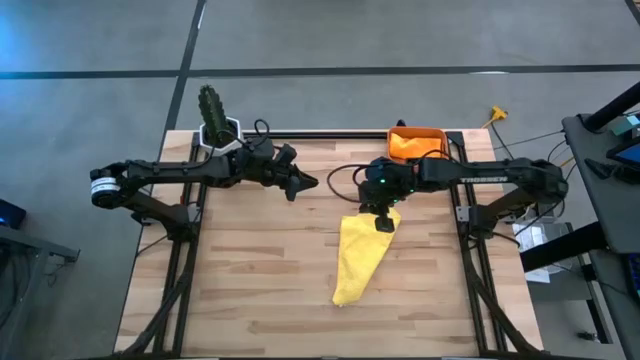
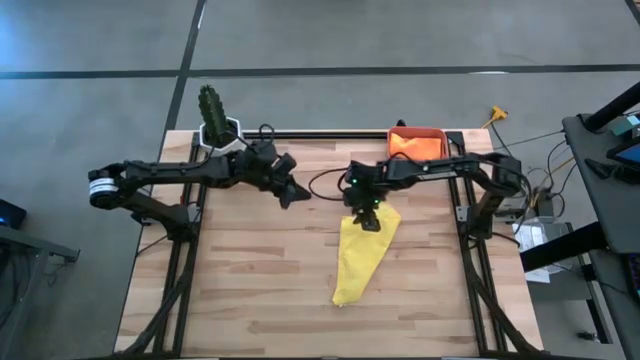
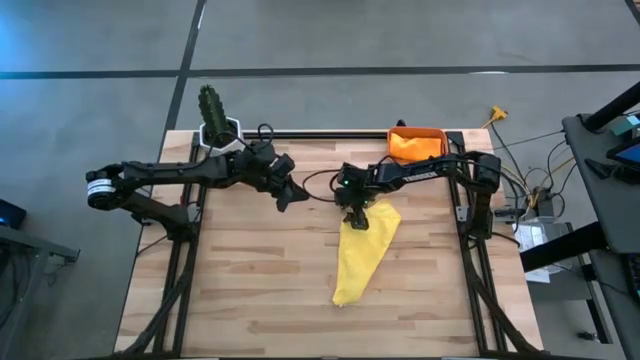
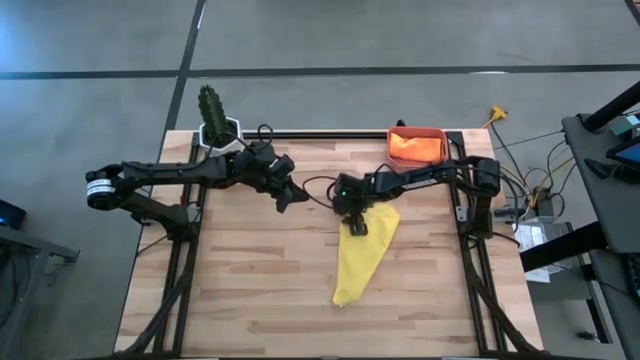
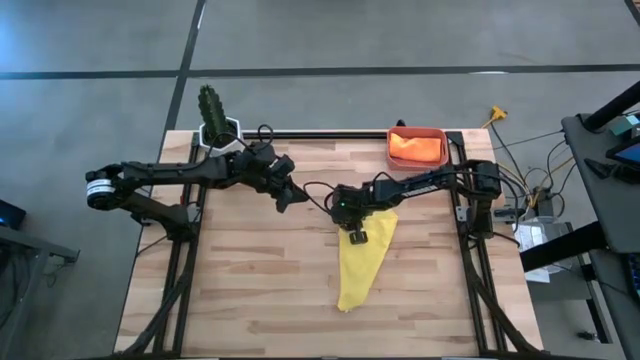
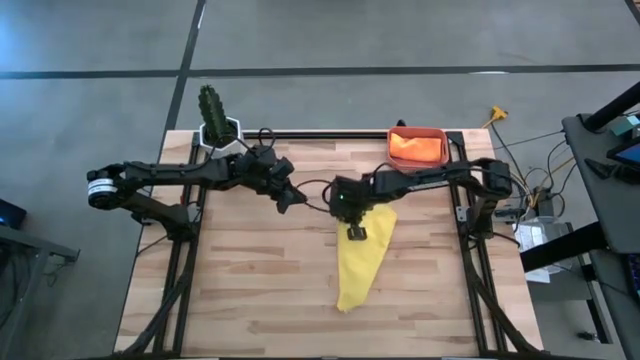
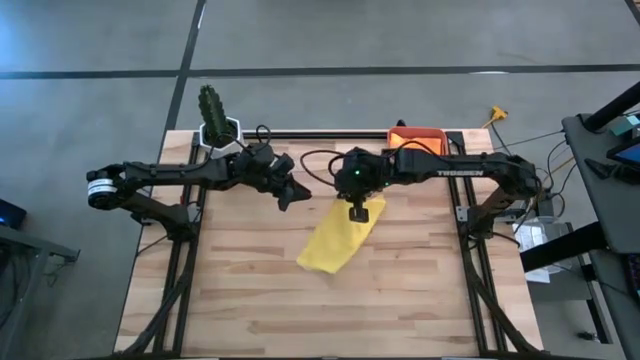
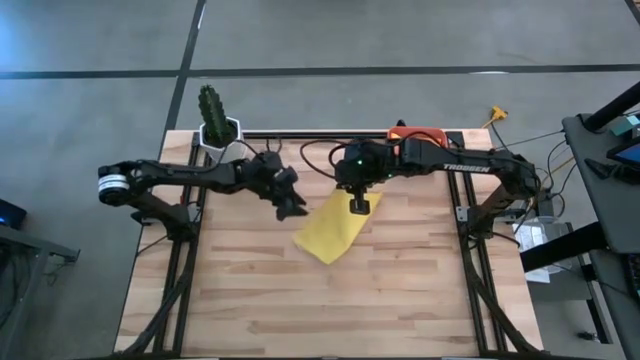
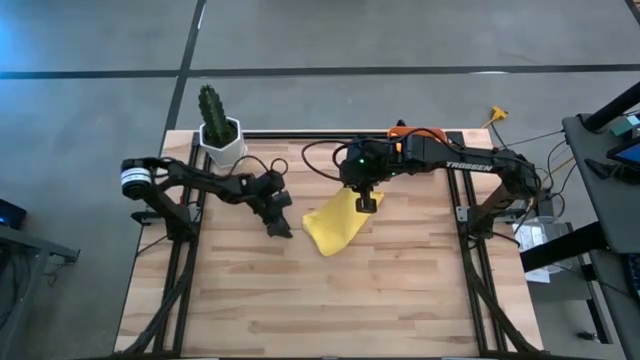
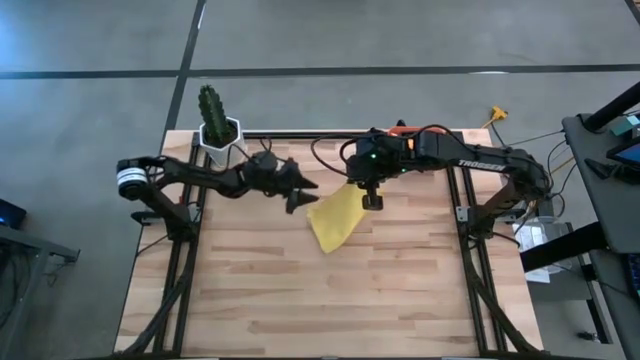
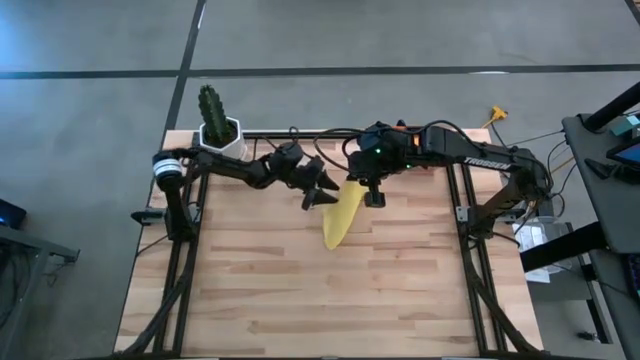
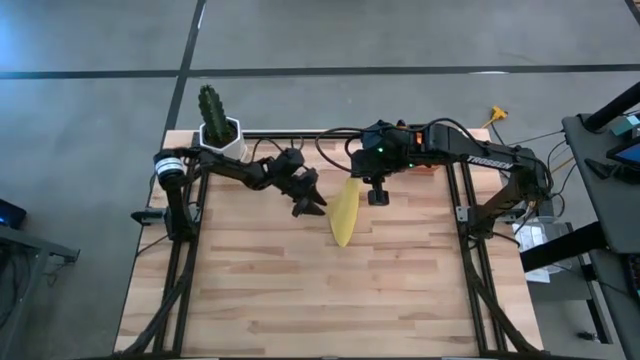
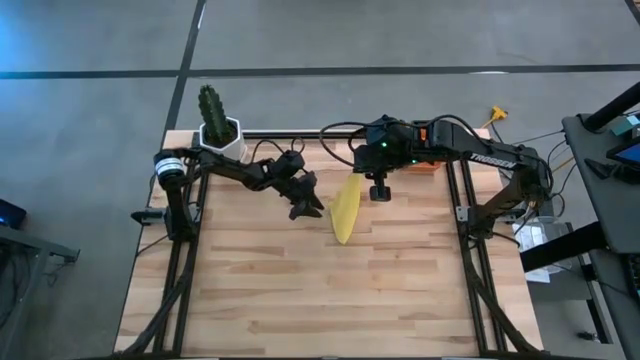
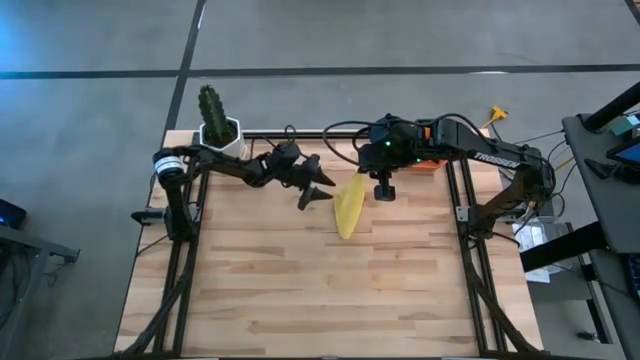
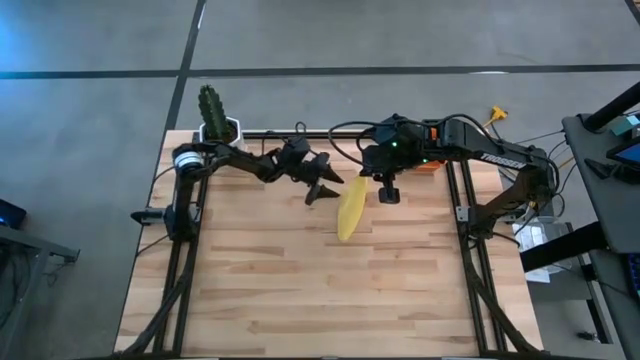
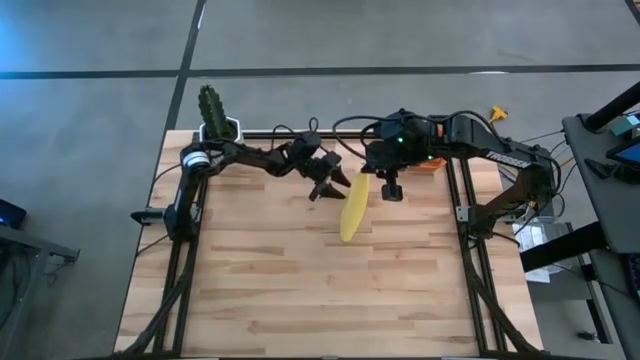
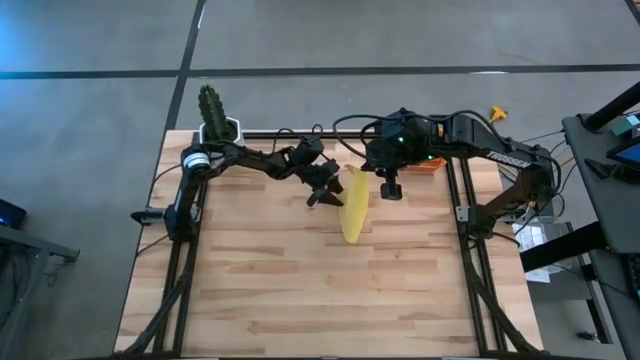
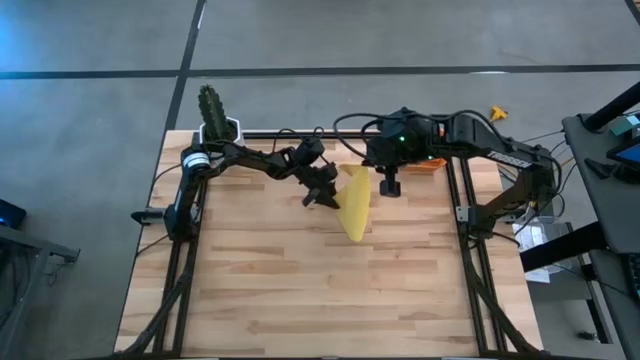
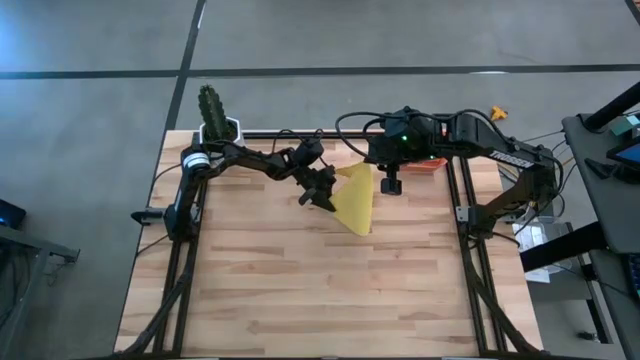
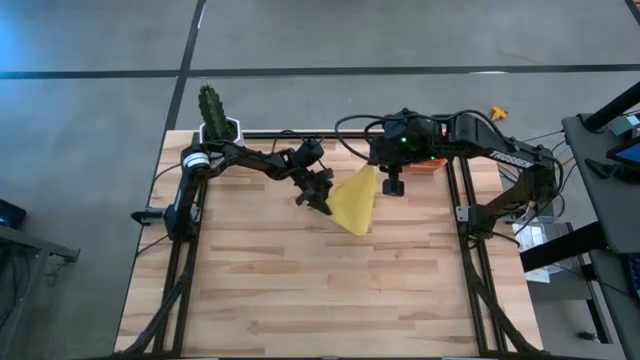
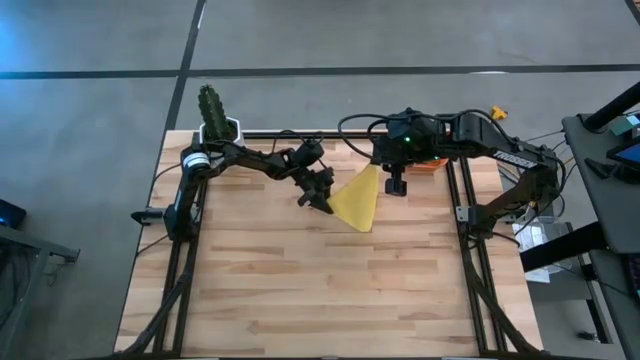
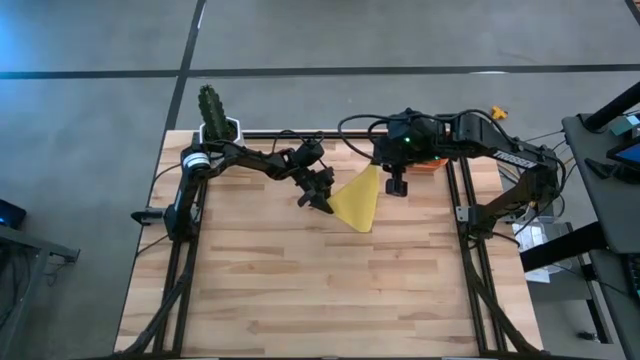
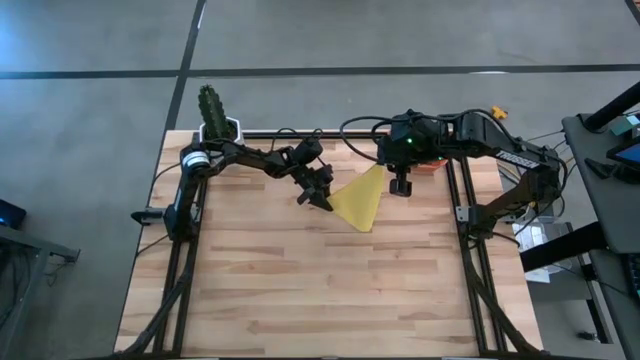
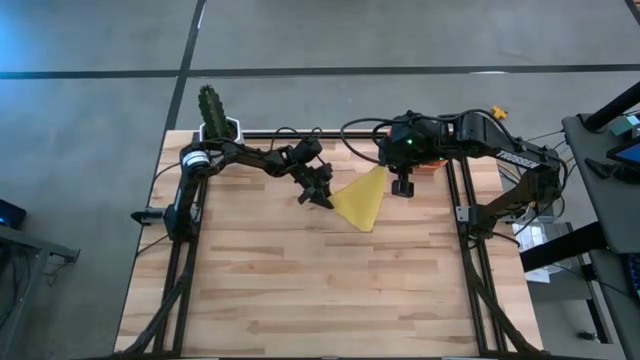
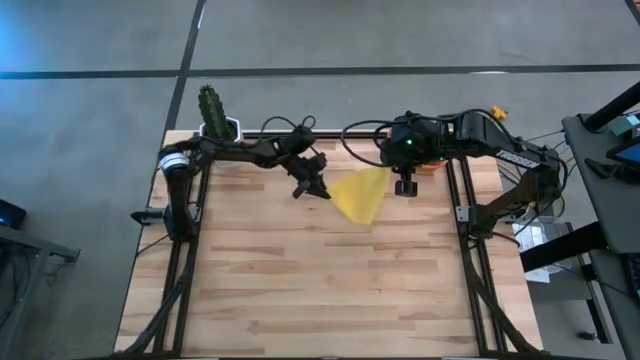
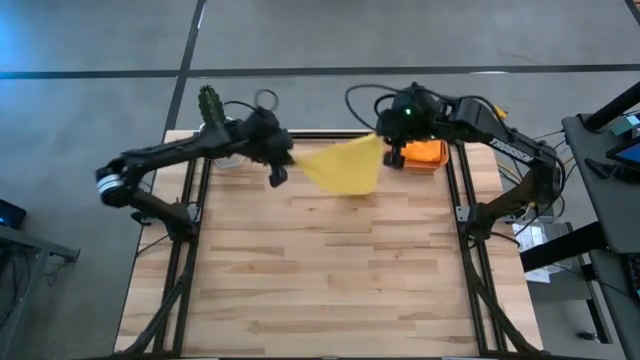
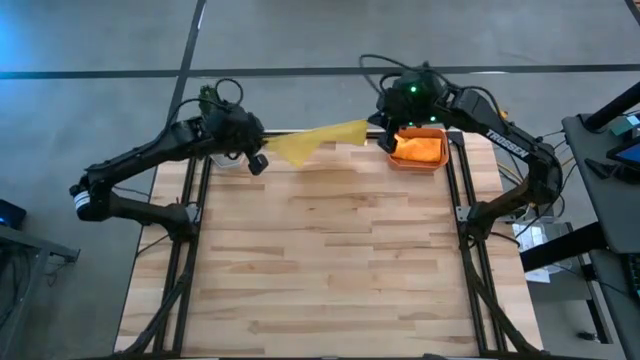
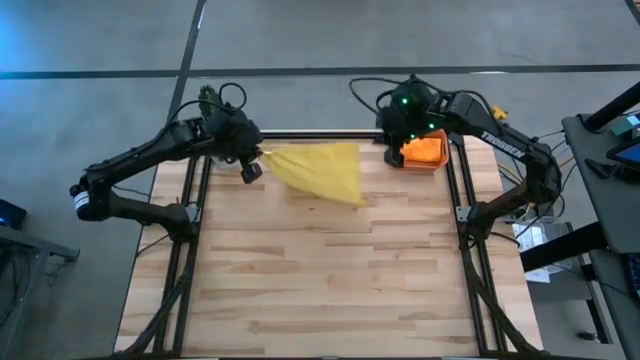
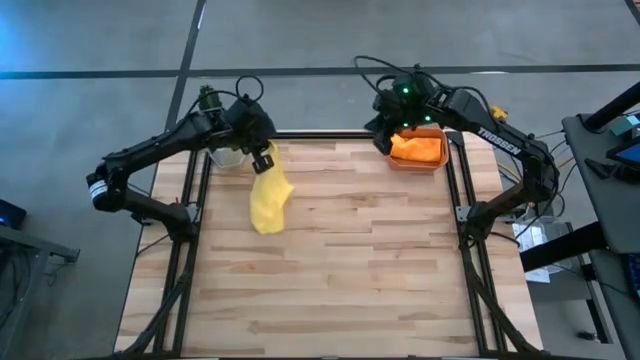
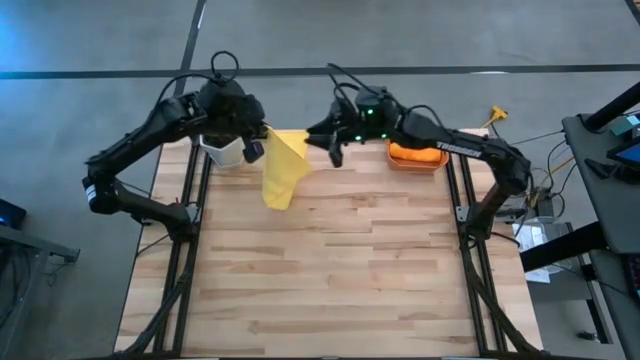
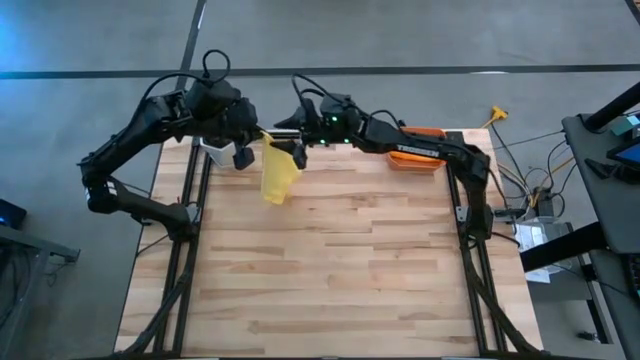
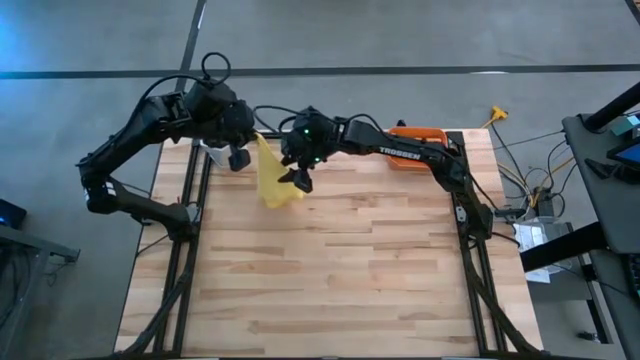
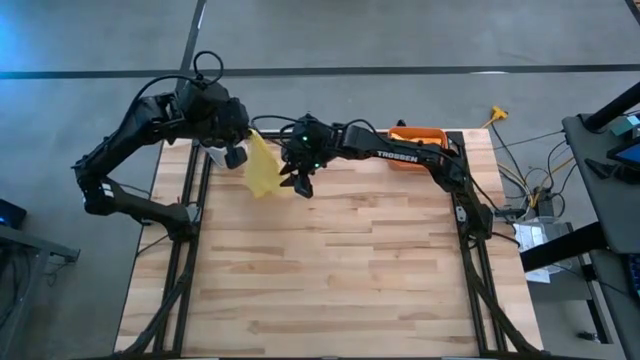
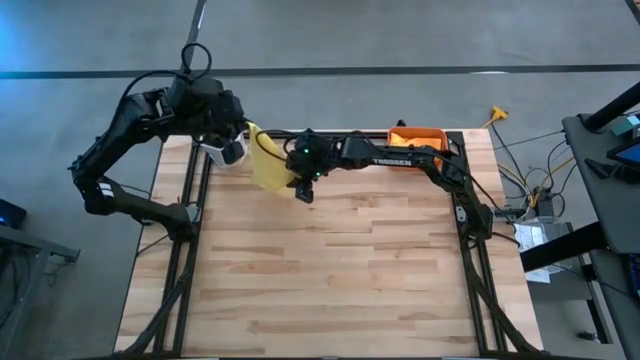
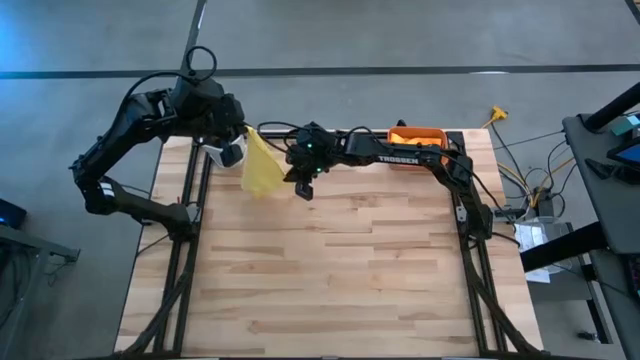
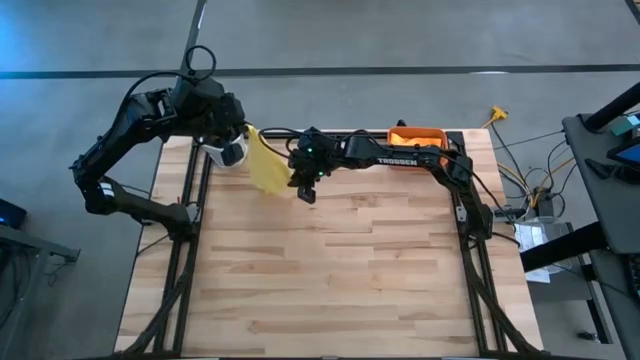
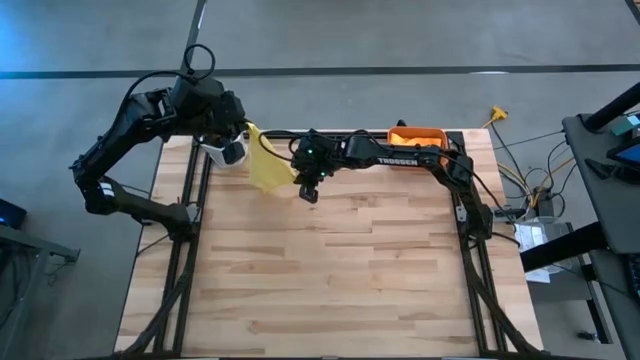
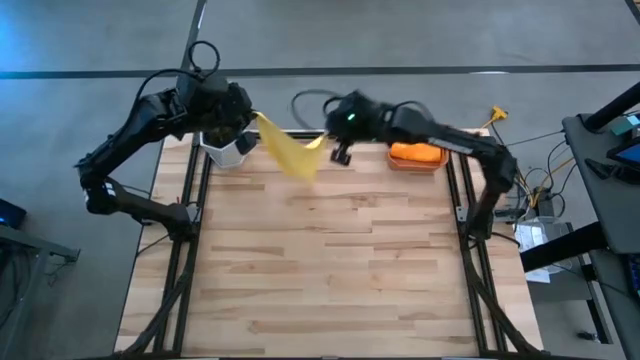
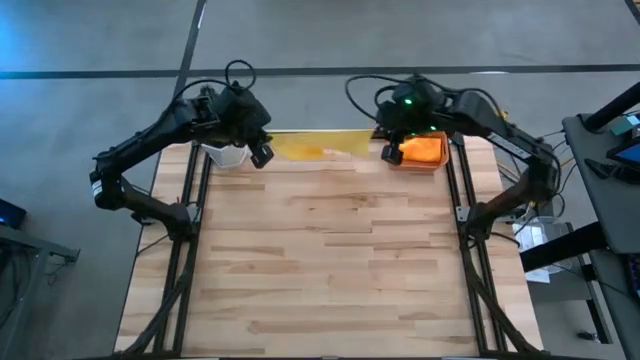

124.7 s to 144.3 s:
Task: Roll microfiber towels into tight, uniform cylinder then place into a basket
Fold the yellow towel
